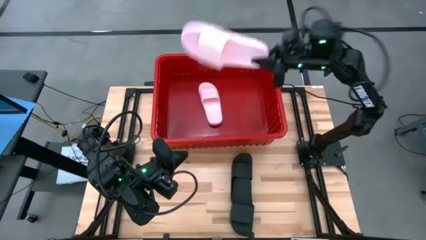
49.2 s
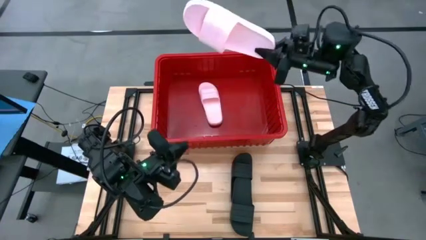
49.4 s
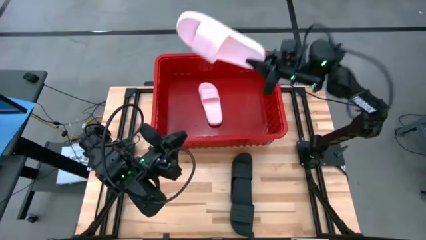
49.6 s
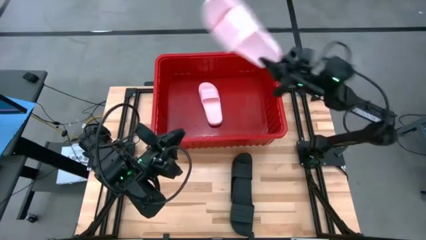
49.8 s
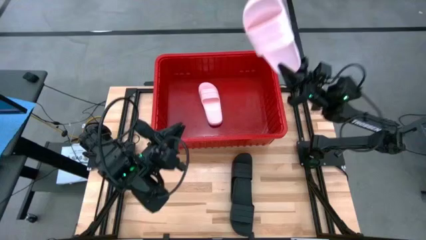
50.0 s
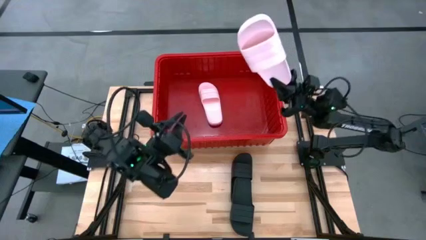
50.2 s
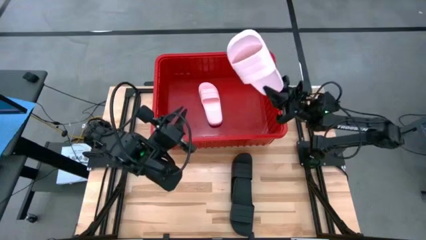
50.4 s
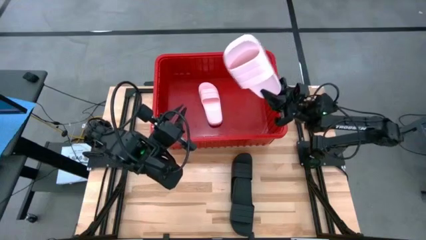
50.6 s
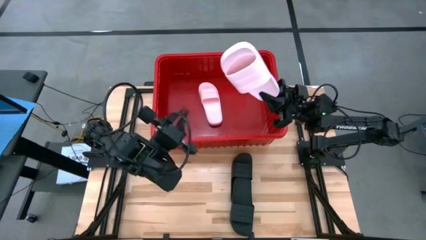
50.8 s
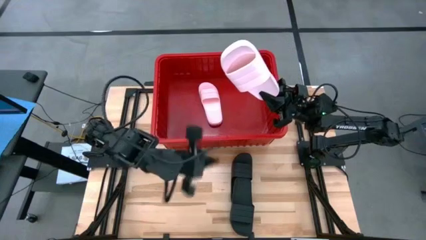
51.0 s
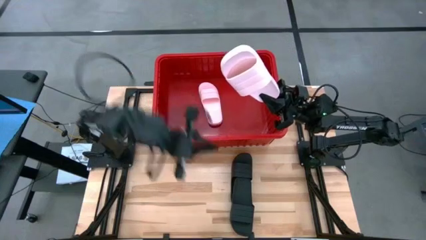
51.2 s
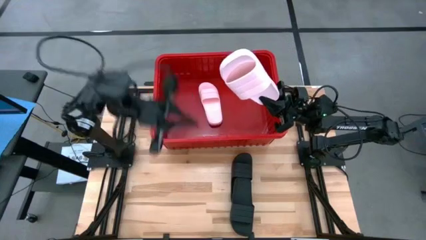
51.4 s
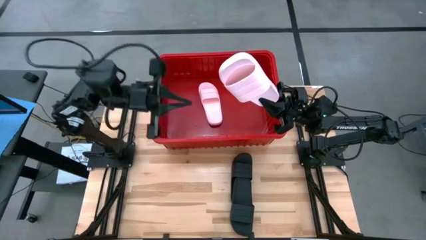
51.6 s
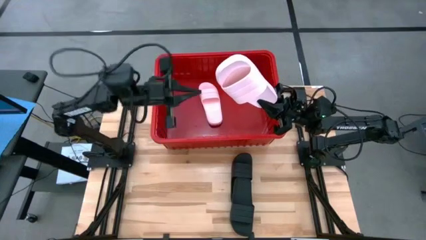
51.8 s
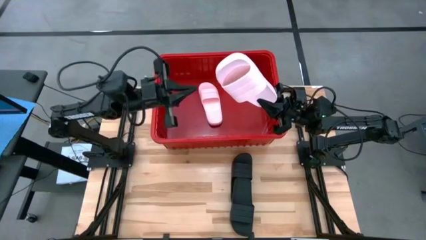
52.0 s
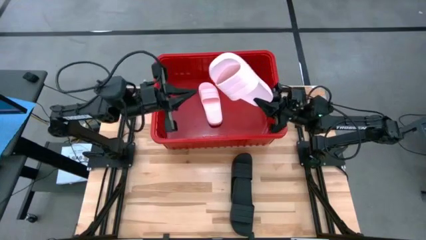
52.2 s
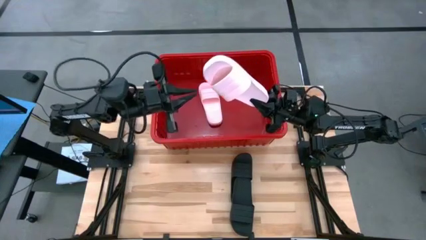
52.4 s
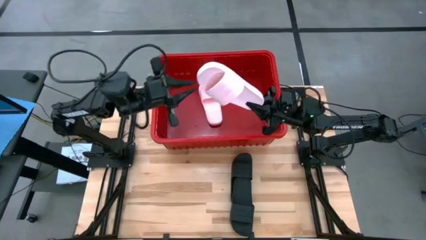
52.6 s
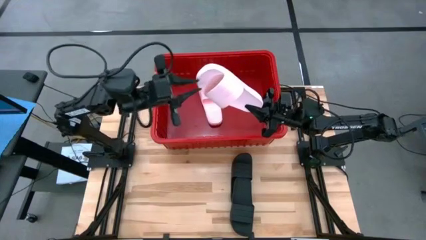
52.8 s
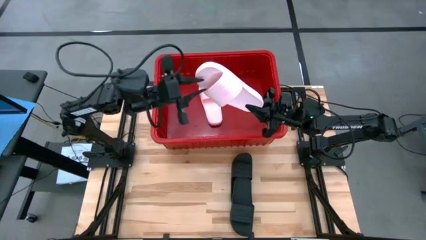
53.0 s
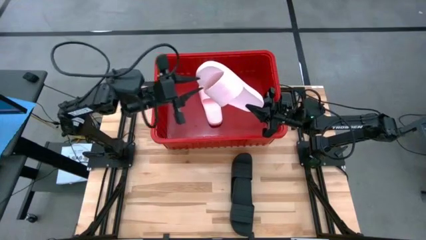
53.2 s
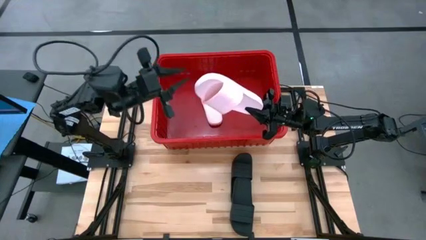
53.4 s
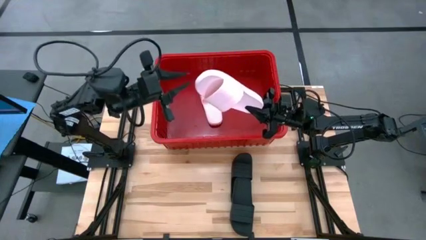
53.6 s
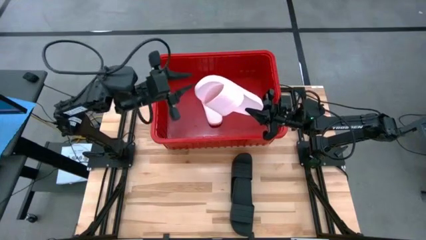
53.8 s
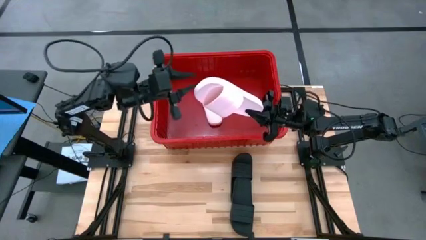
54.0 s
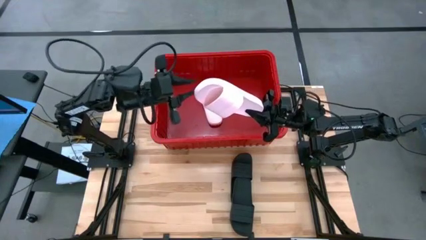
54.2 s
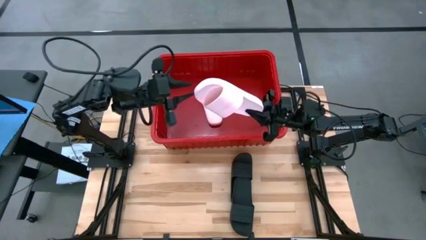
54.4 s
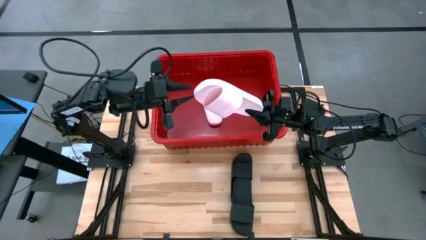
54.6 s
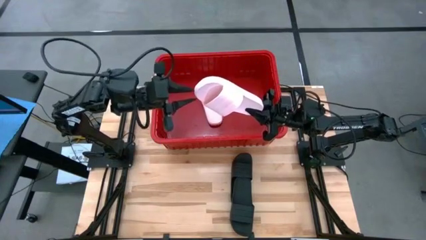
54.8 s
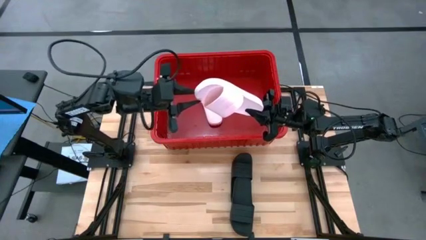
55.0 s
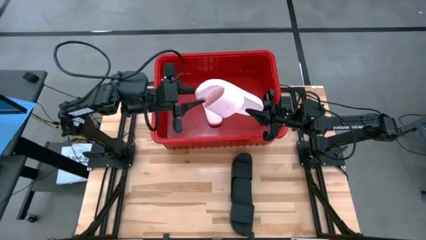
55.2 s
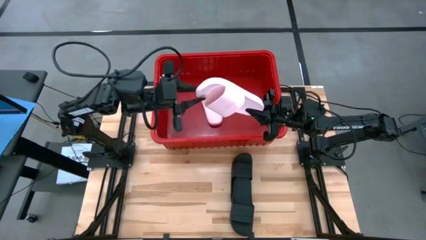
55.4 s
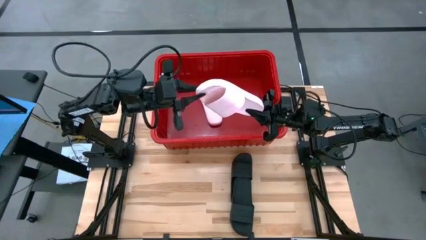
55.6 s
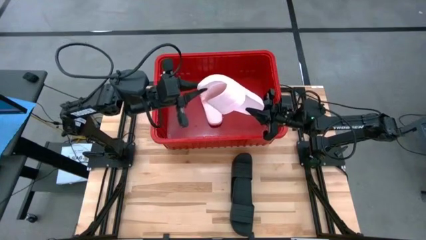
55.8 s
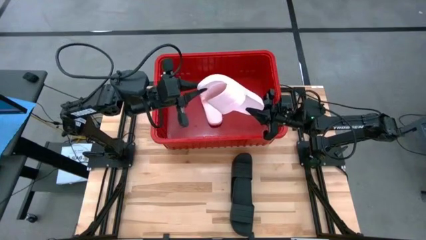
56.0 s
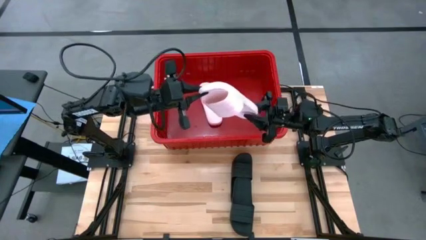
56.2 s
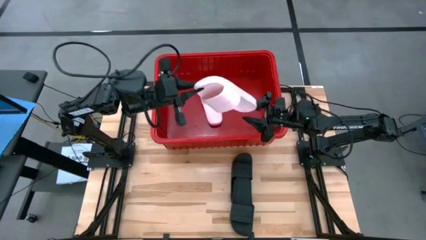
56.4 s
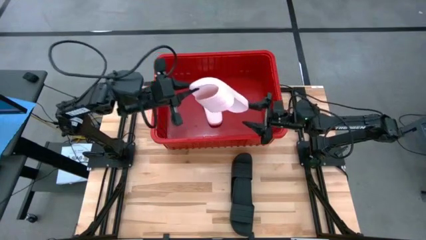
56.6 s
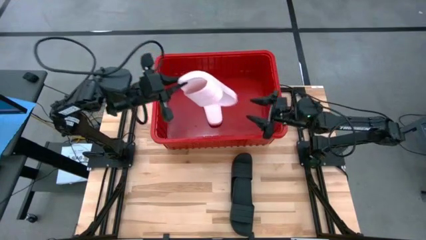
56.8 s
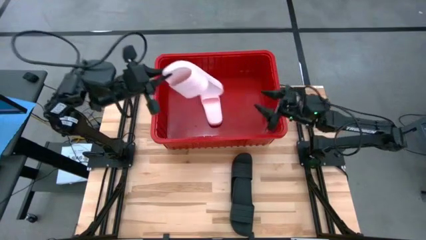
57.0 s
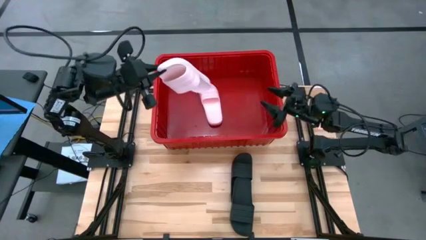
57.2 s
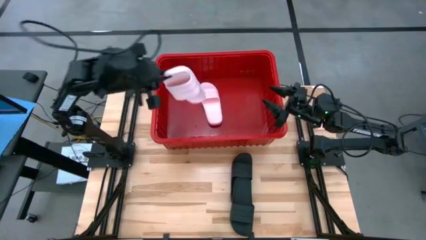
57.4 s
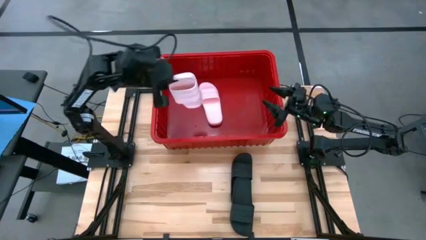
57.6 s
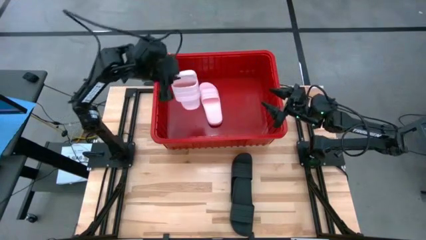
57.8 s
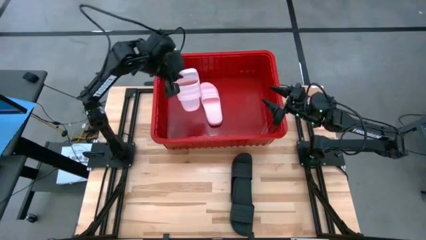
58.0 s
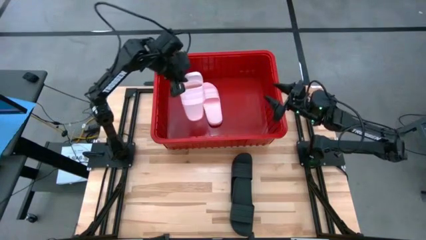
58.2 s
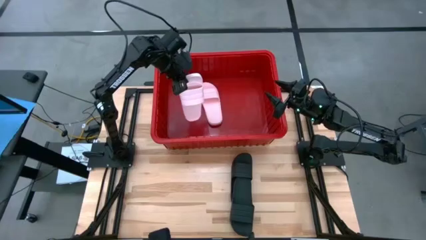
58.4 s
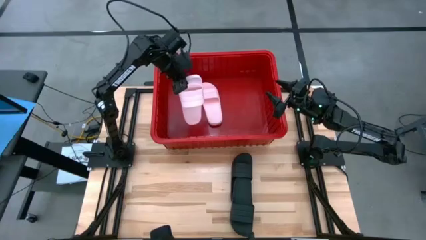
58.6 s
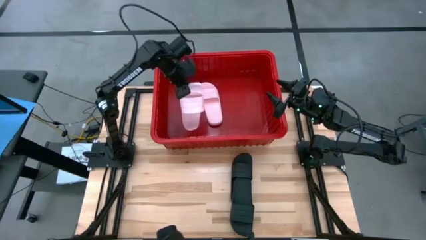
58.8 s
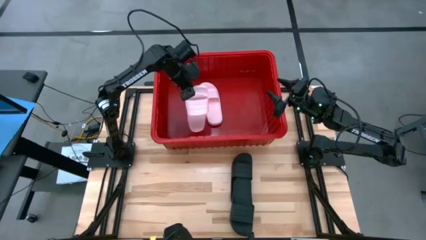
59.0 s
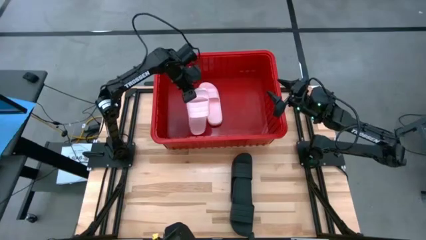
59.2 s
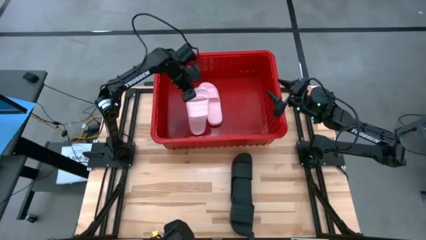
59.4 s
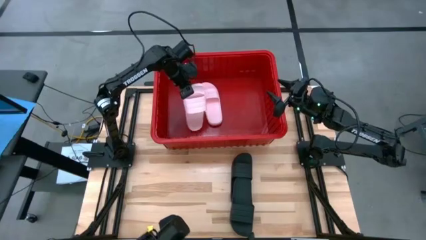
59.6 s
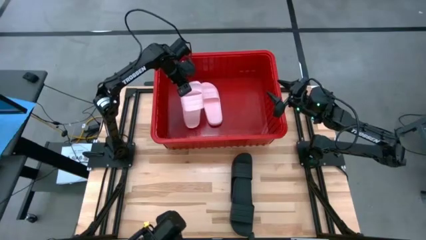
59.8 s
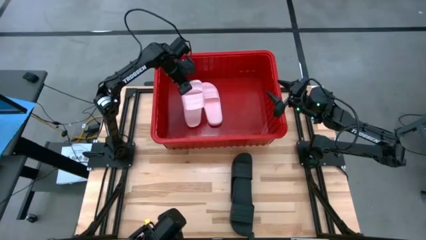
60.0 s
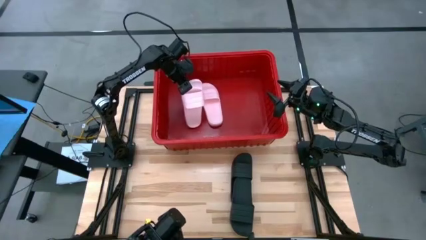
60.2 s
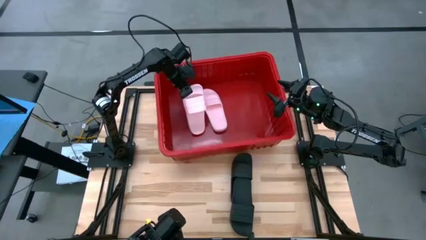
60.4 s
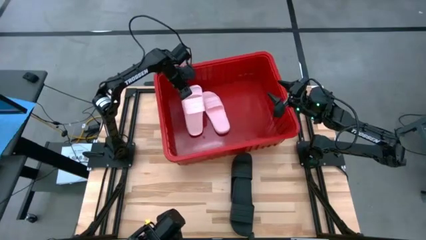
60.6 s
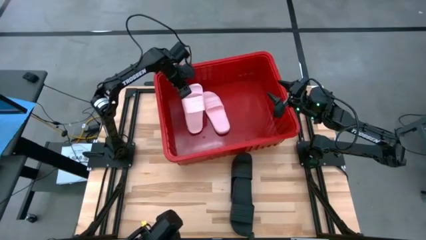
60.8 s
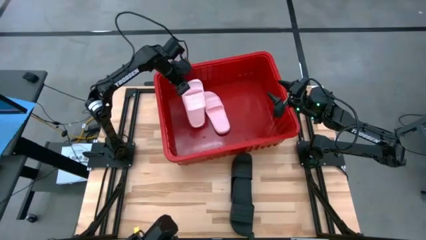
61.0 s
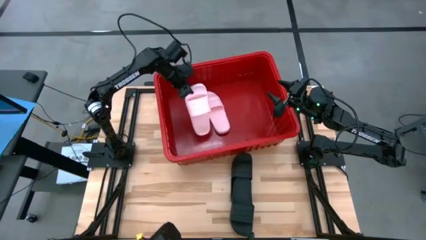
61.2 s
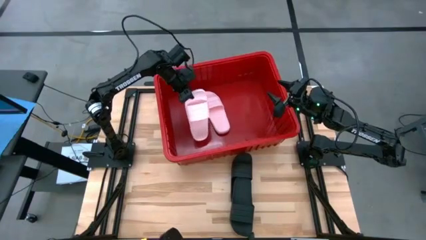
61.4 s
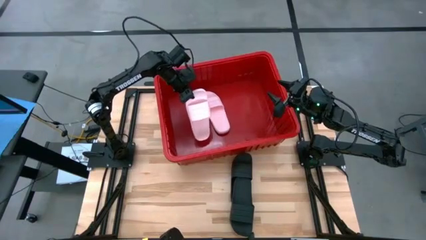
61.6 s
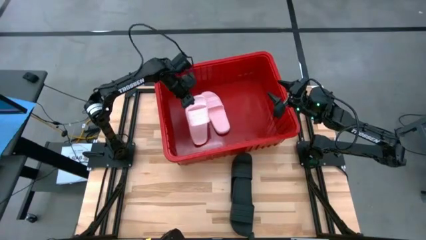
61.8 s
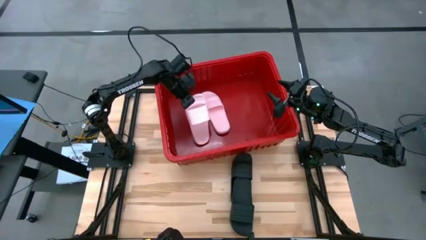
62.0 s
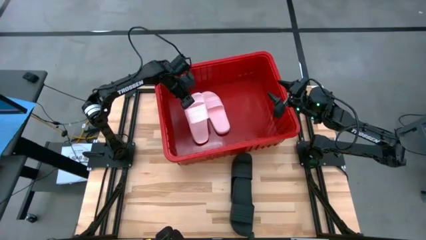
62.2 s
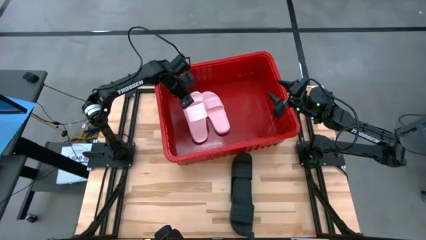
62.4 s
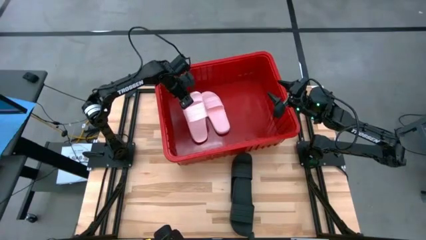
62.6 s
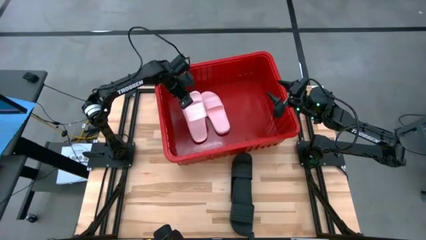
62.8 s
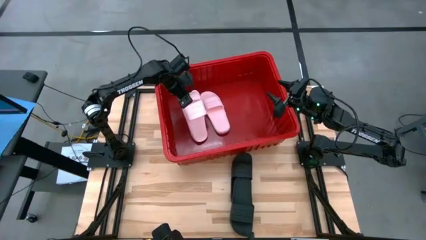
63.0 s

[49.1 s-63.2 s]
Task: Pick and place slides into bin
Put the pink slipper in the red bin

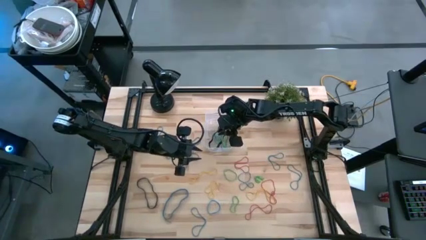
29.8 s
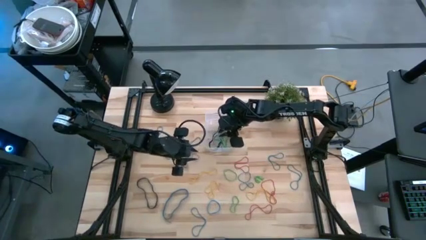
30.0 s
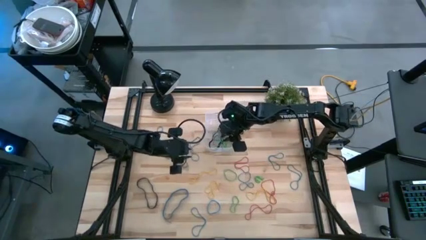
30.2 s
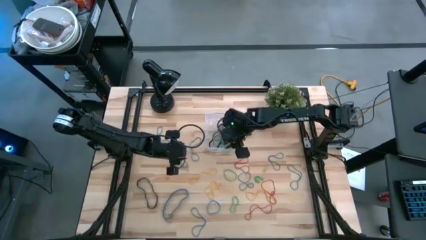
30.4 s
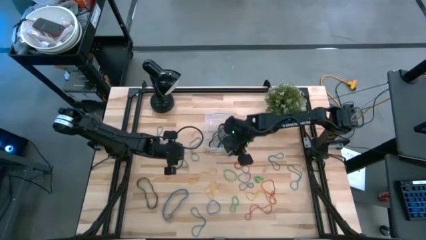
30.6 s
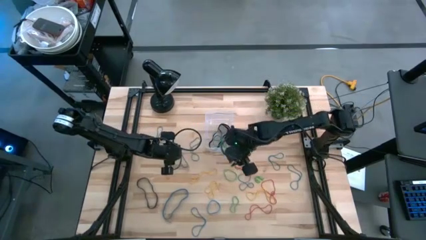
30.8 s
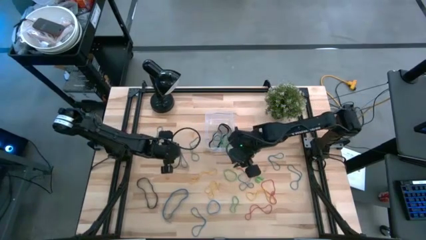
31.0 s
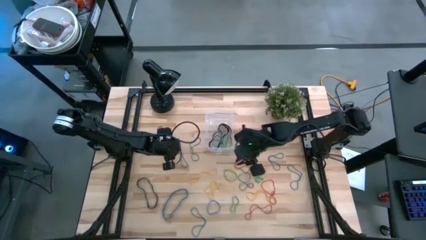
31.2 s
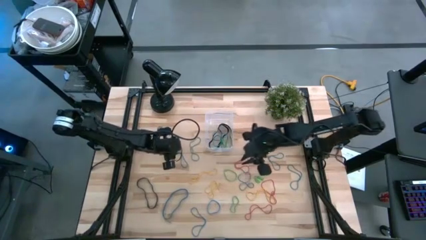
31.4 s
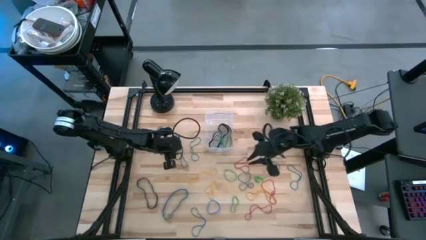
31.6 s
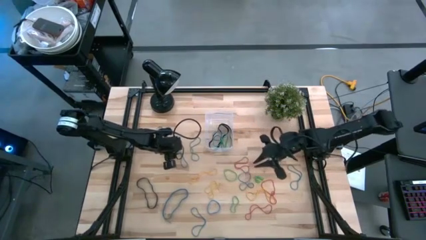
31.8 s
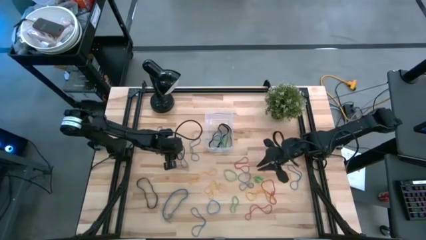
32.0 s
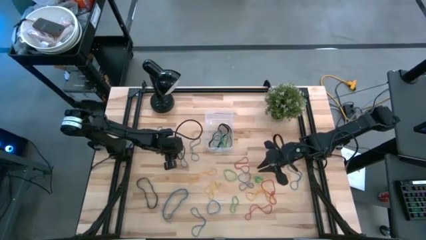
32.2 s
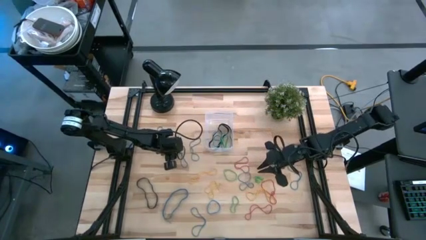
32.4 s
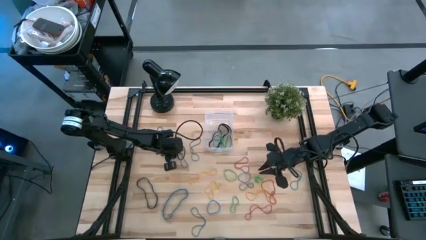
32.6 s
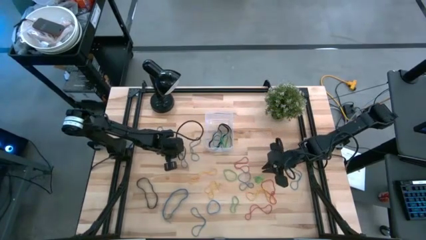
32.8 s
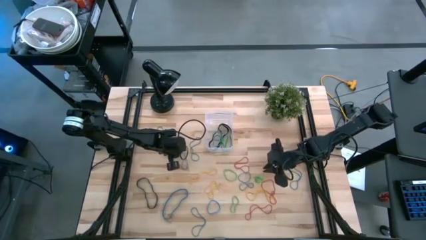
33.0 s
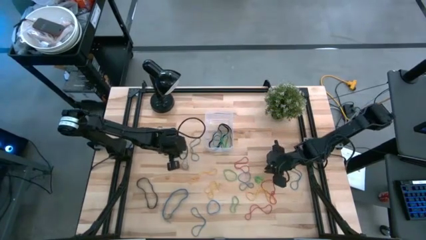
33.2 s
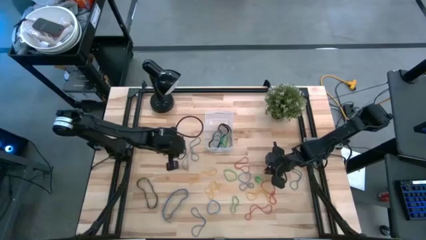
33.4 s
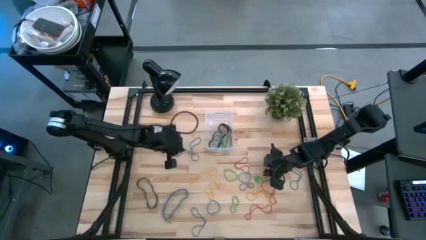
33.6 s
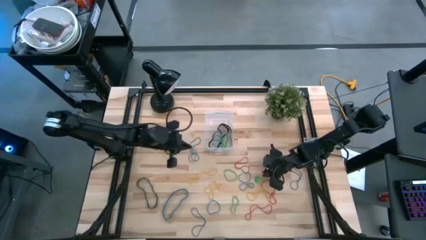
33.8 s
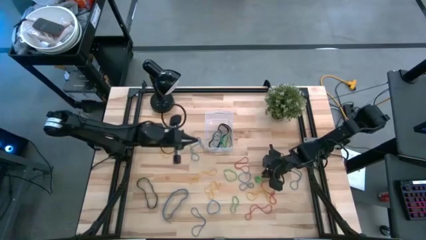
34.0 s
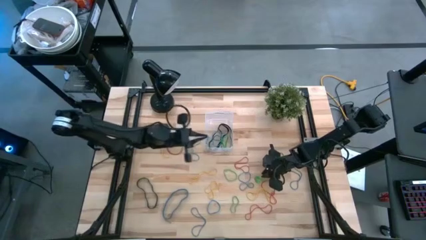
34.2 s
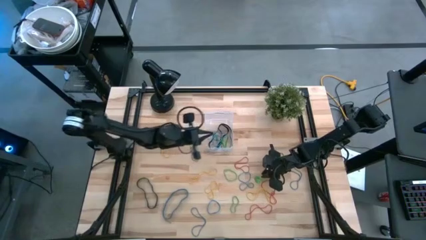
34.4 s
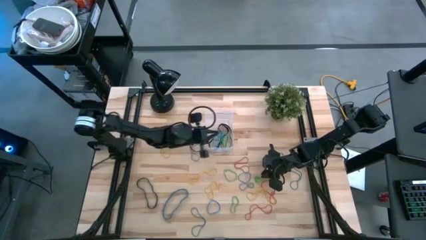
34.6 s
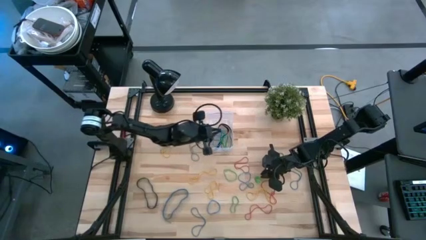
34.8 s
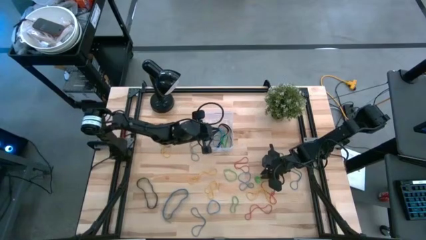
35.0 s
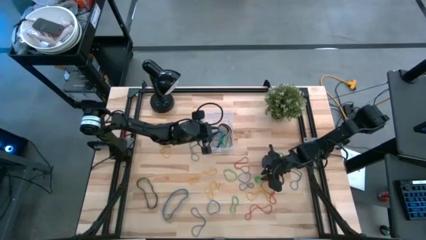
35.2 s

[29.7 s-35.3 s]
Task: Pick and place rubber bands into bin
Put blue rubberband into the transparent bin
